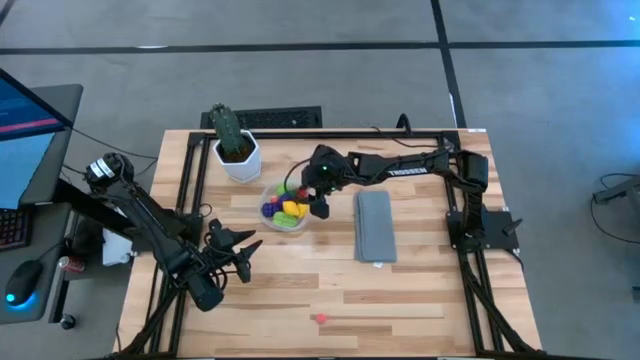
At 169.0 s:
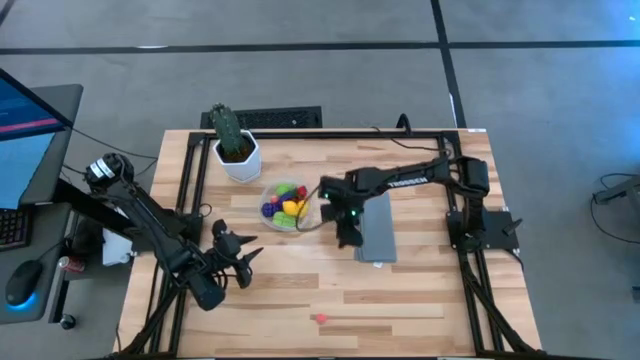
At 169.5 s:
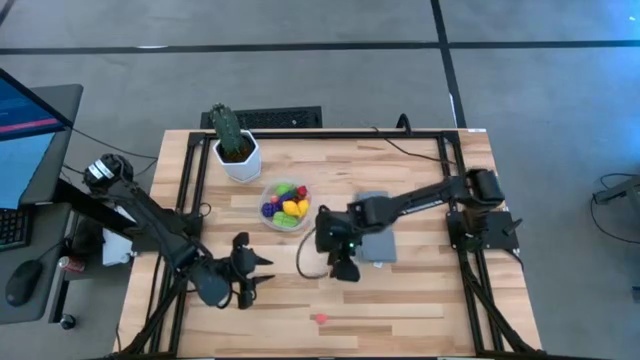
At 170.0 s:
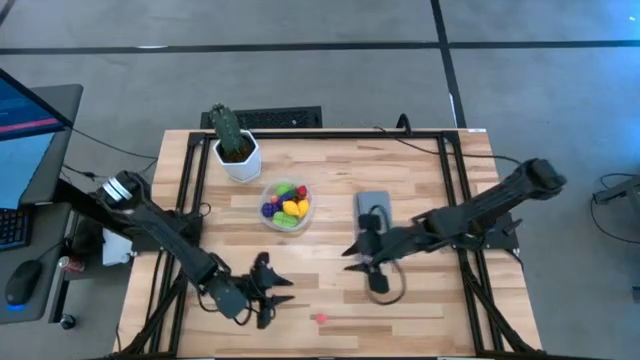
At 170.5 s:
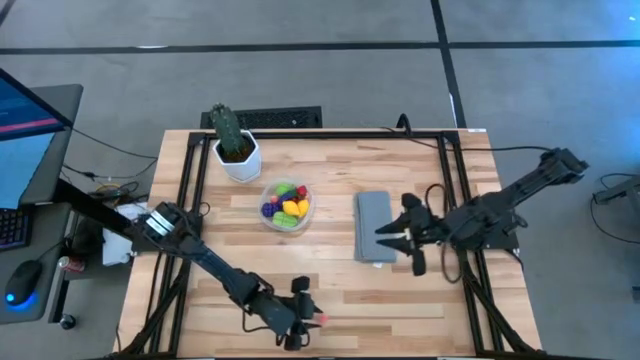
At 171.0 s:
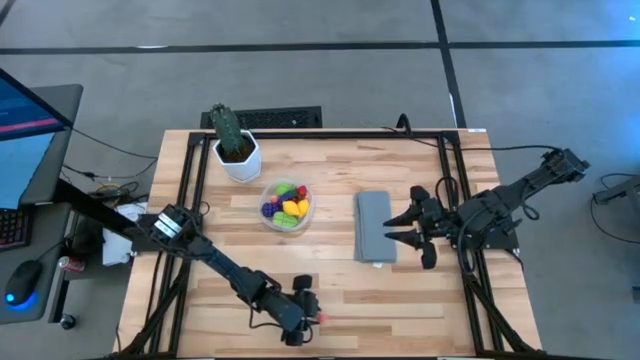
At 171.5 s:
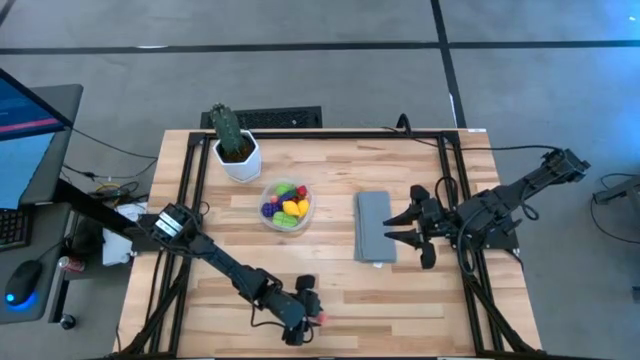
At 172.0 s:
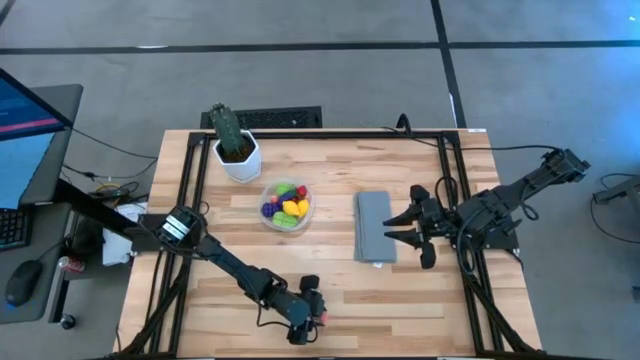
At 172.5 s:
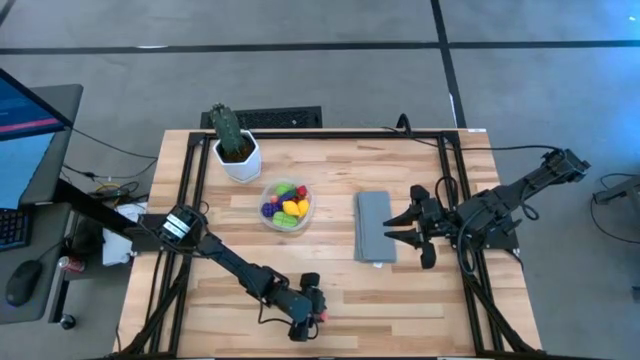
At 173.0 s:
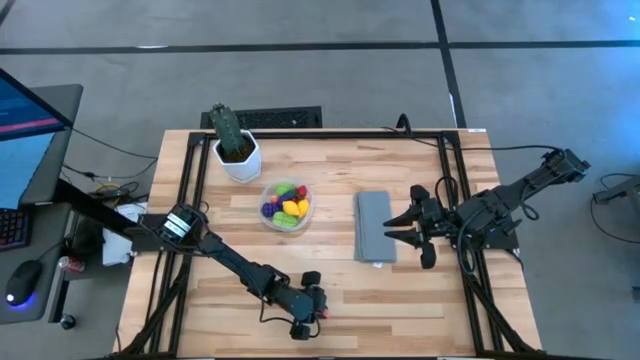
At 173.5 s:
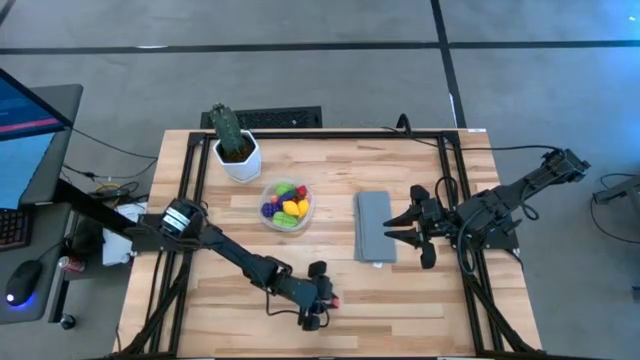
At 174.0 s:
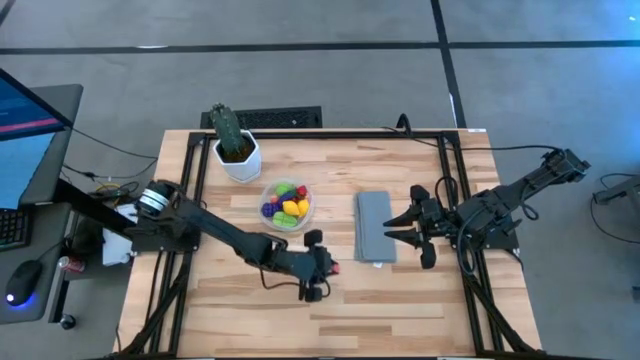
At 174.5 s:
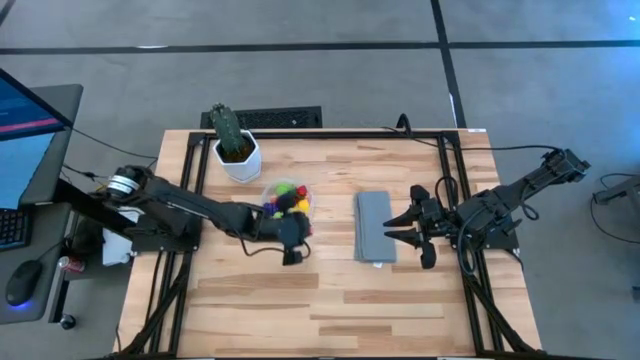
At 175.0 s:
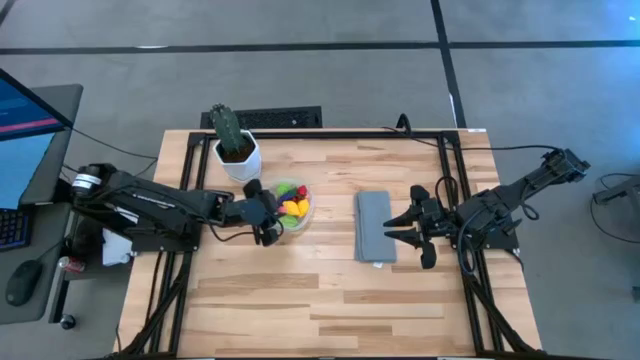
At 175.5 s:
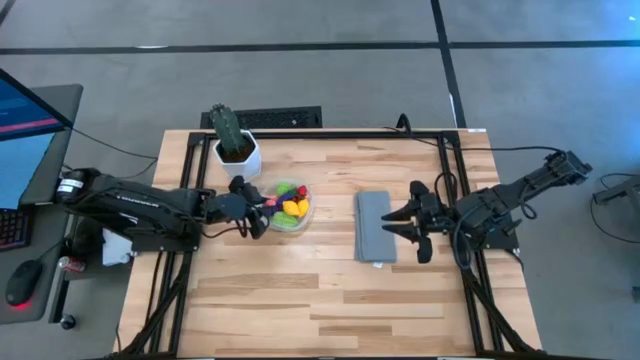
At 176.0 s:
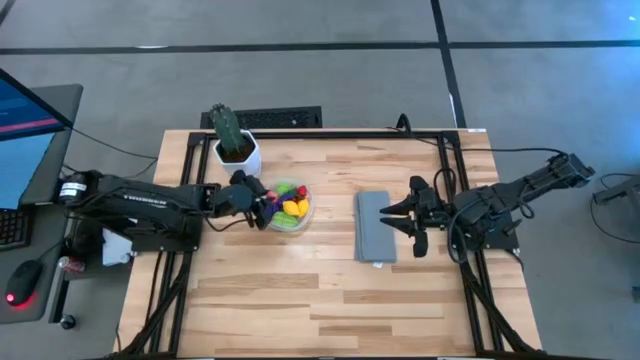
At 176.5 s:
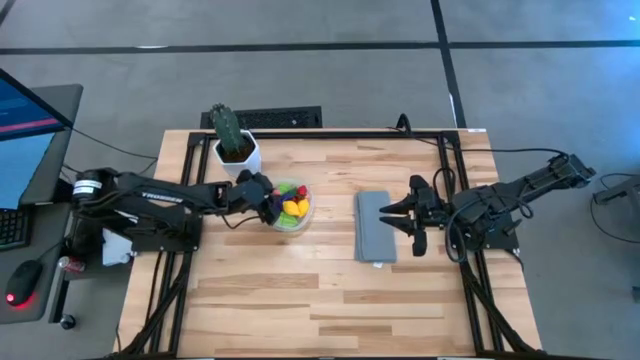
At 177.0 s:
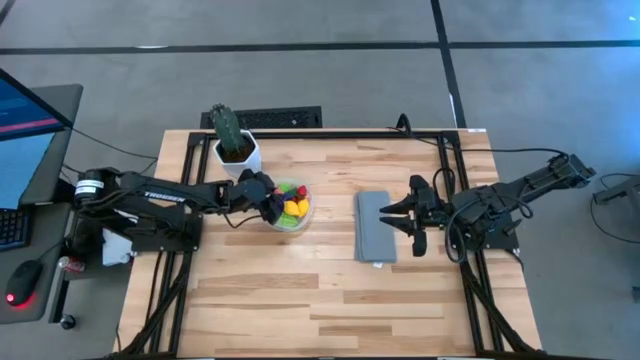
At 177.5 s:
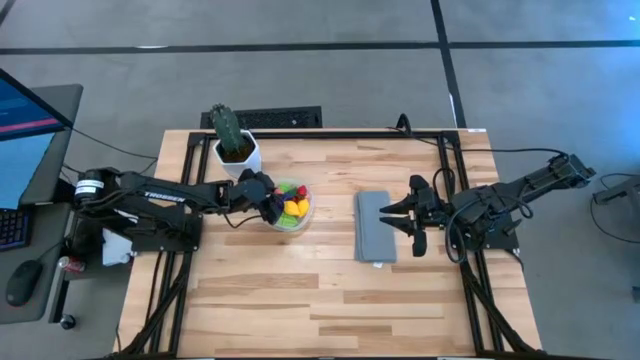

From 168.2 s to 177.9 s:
Task: Pick and placing Produce into tupperware
Put the pink peach into the transparent container

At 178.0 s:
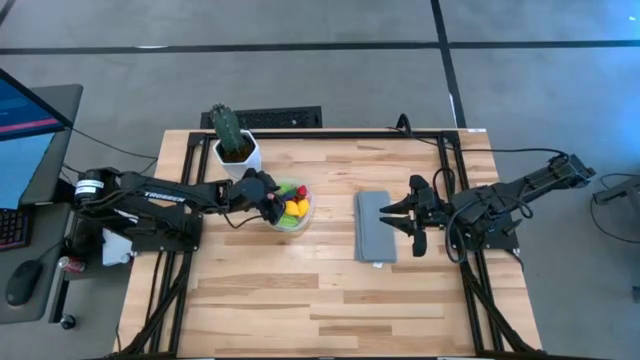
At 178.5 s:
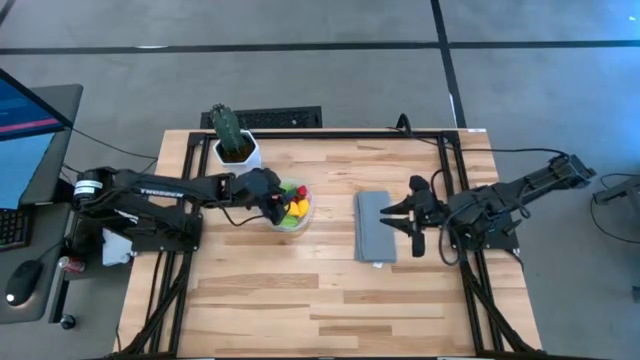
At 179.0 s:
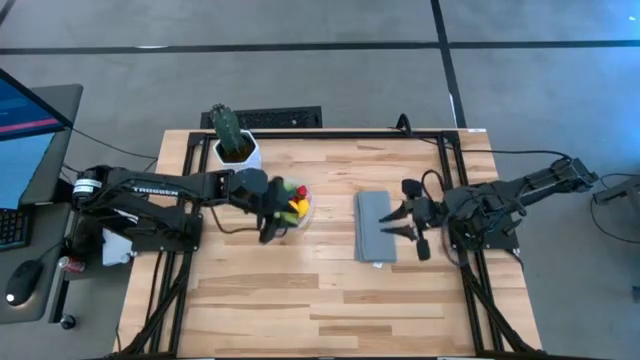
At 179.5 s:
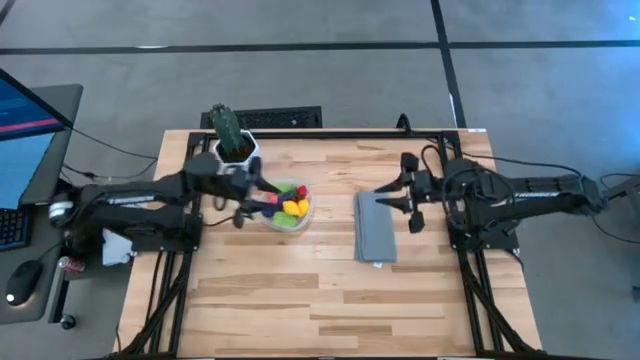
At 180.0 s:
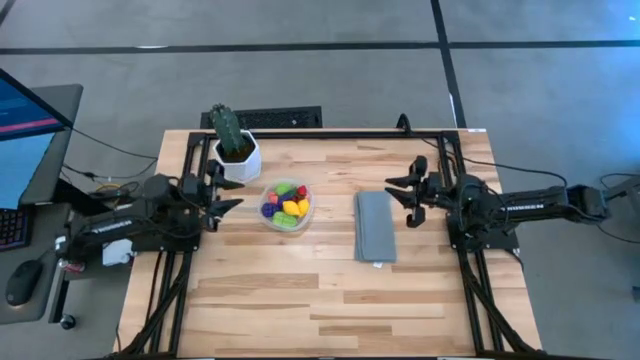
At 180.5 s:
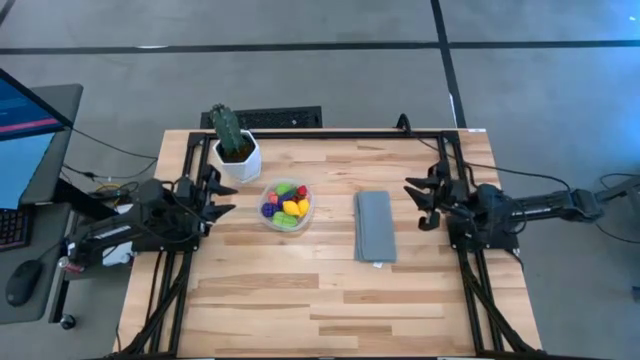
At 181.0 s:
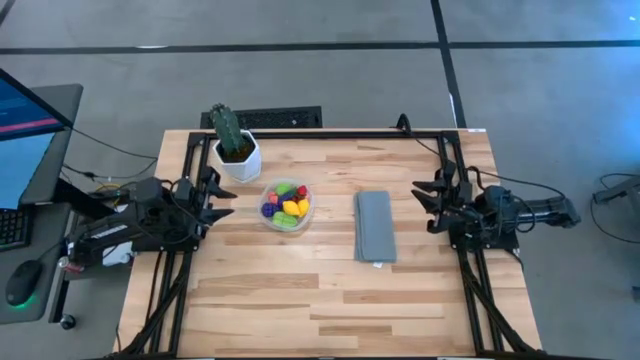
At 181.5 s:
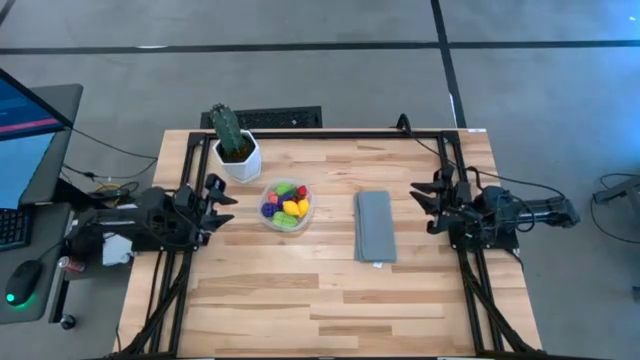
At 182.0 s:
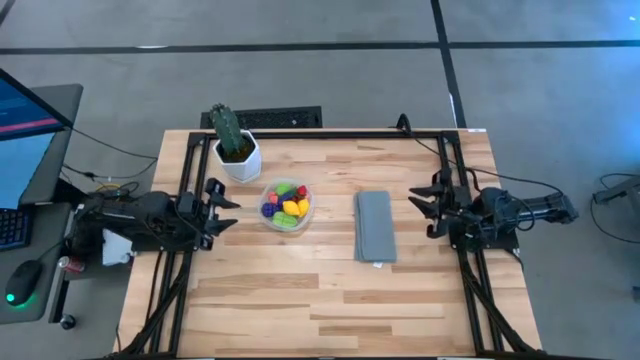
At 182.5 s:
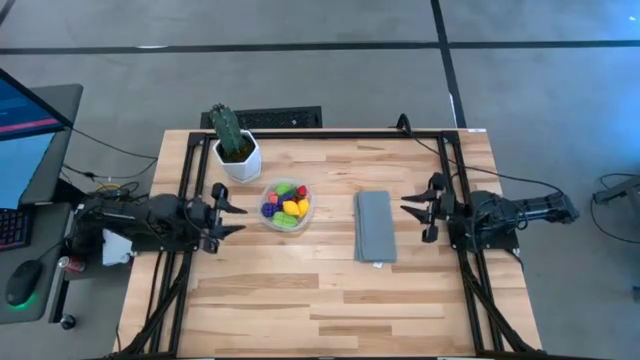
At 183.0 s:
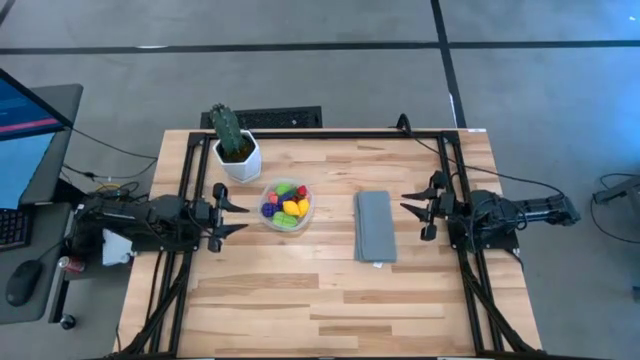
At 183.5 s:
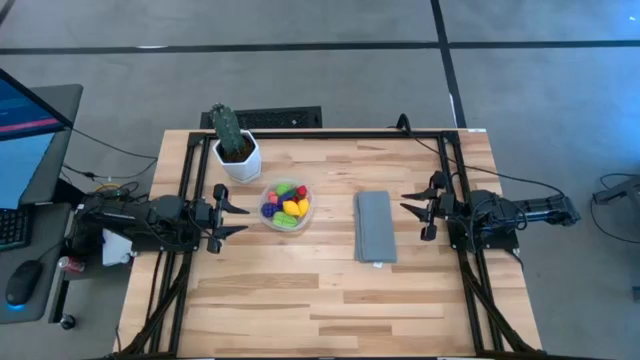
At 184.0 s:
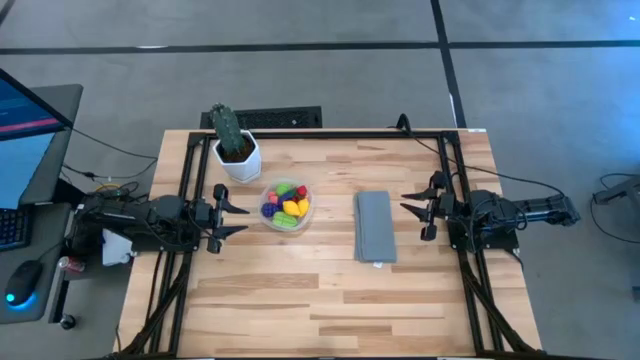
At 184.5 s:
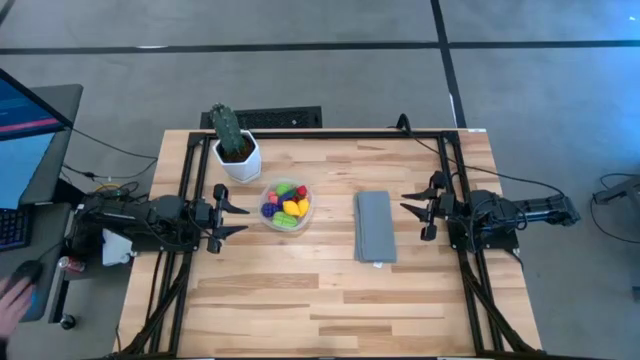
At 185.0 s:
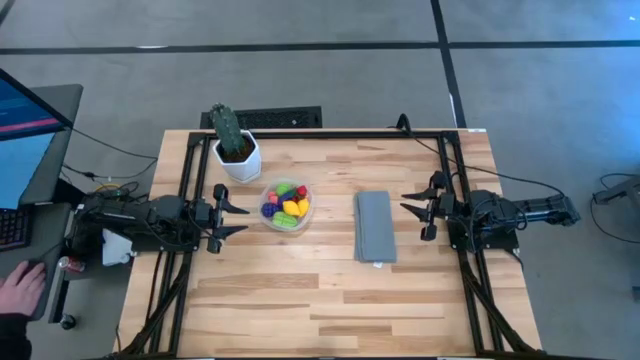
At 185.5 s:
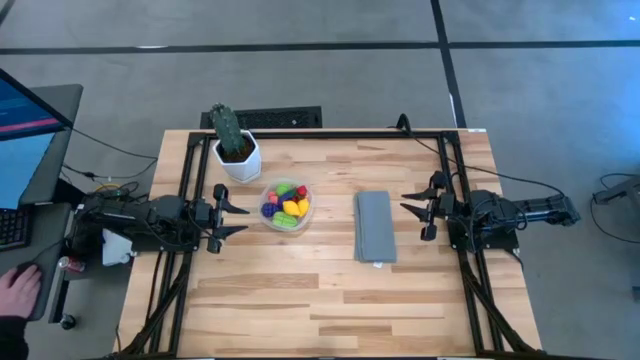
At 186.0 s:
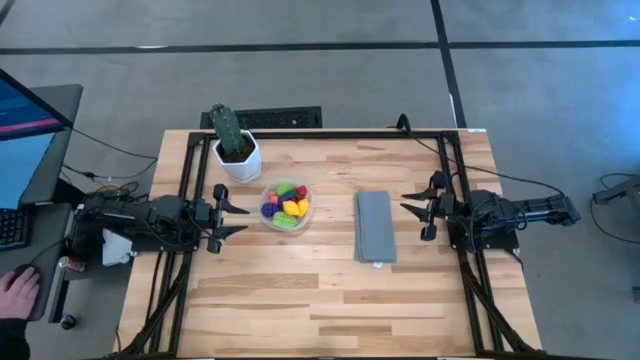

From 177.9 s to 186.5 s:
Return to Home Position

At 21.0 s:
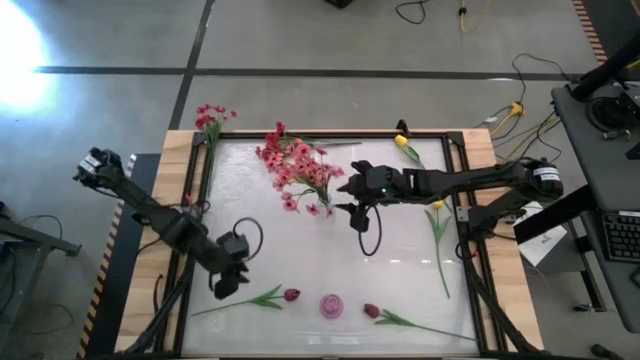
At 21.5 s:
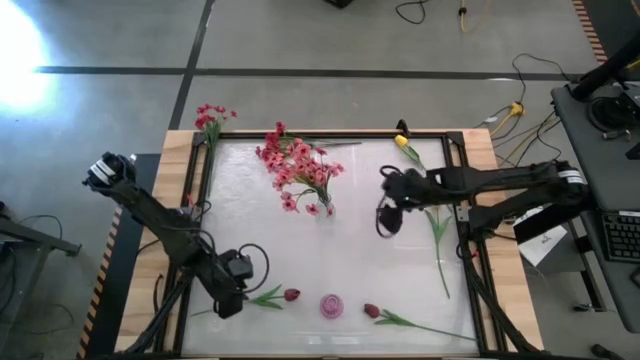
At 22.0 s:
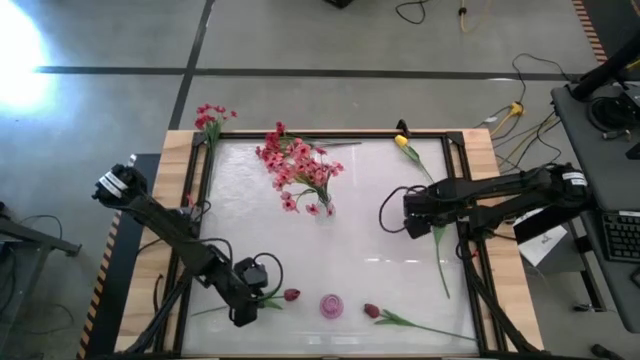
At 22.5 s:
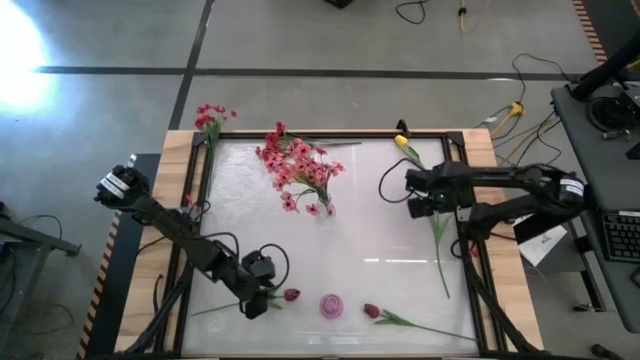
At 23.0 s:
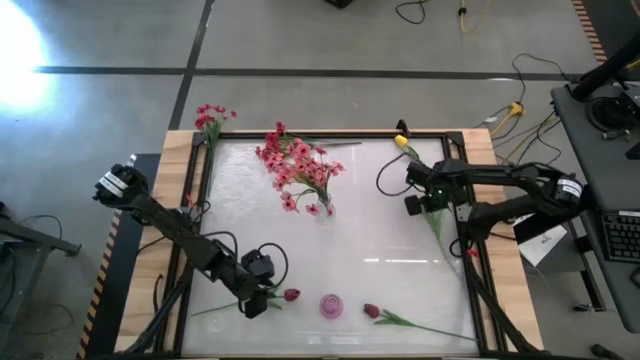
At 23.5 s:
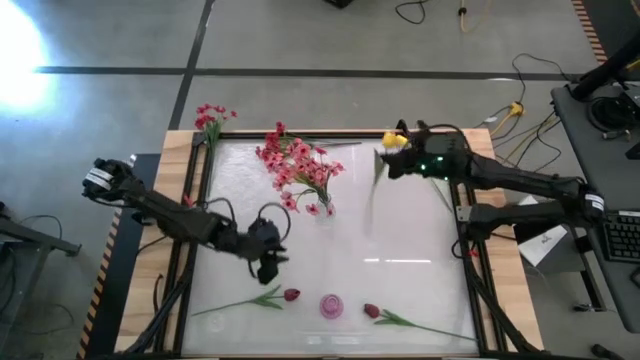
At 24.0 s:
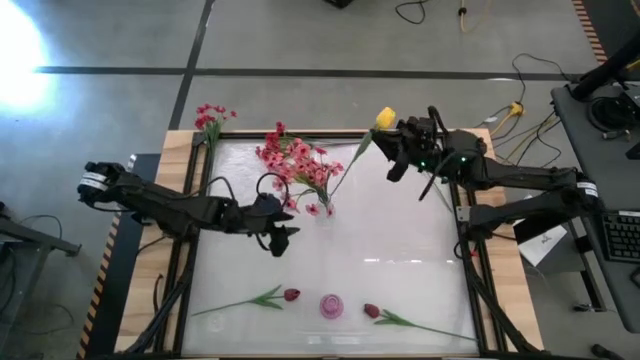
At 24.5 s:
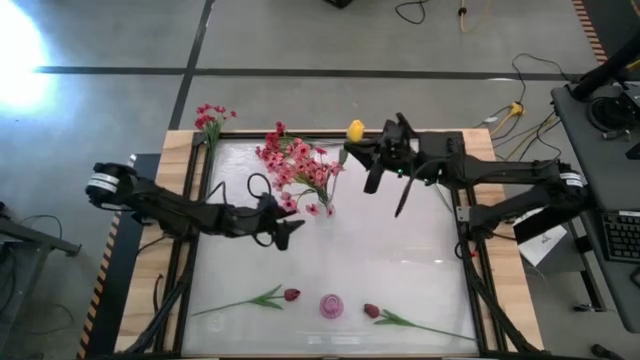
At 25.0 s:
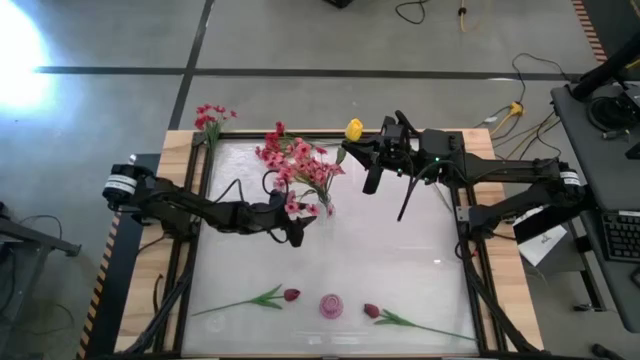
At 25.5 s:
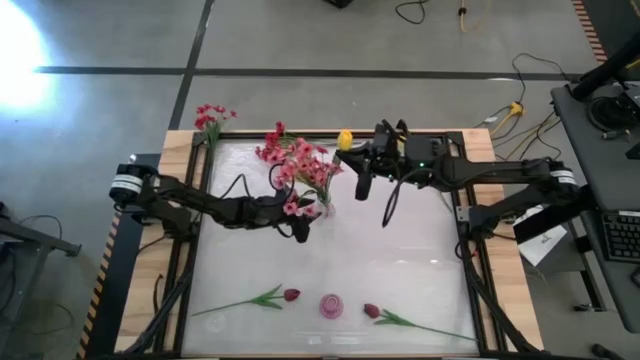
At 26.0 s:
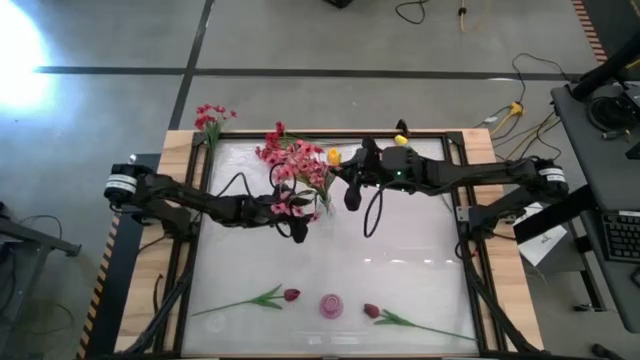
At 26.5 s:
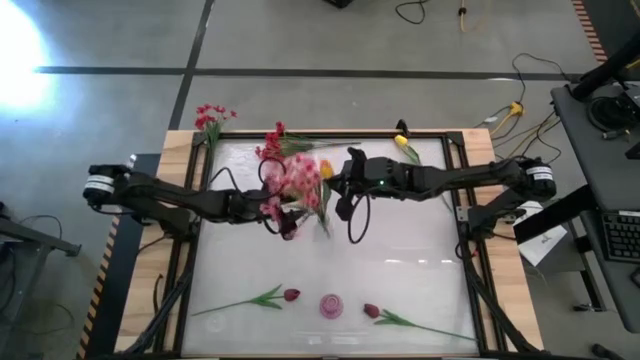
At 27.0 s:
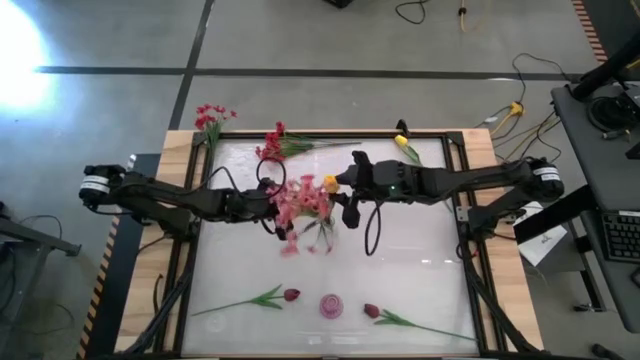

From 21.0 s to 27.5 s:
Task: Sort flowers into vase by color
Put the bottom yellow flower into the transparent vase
